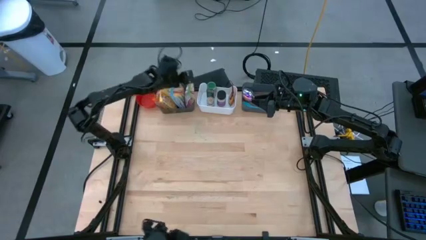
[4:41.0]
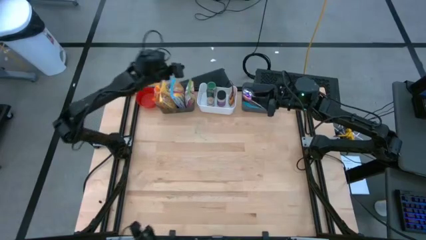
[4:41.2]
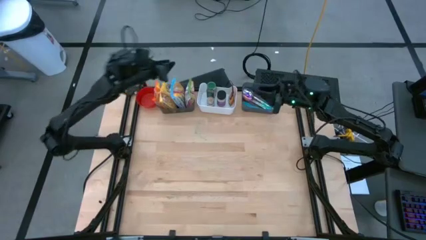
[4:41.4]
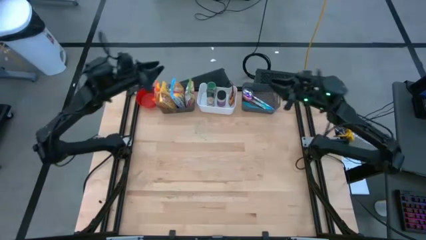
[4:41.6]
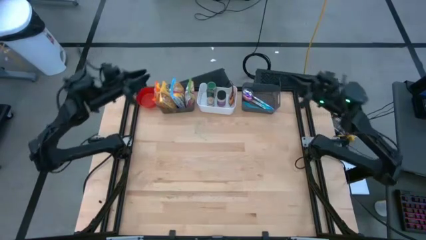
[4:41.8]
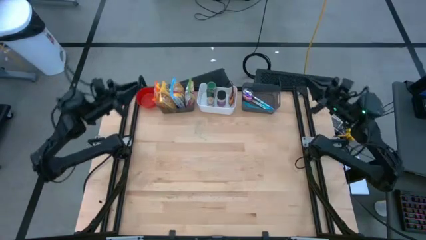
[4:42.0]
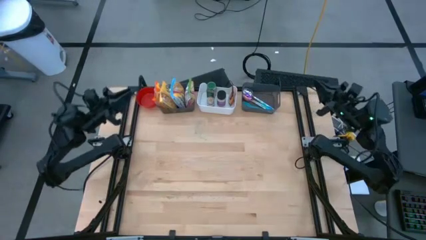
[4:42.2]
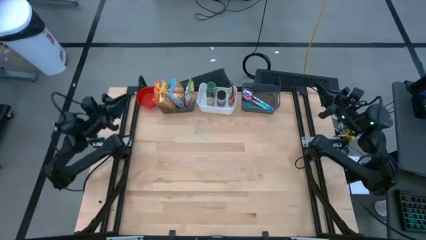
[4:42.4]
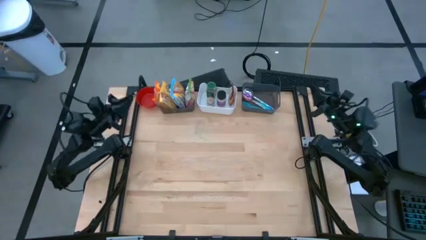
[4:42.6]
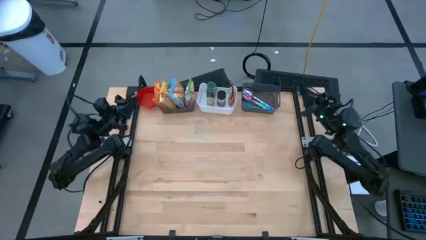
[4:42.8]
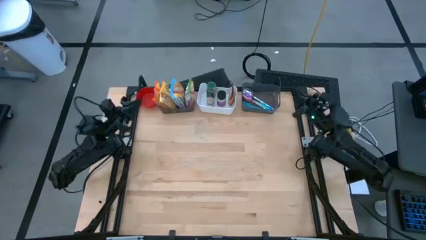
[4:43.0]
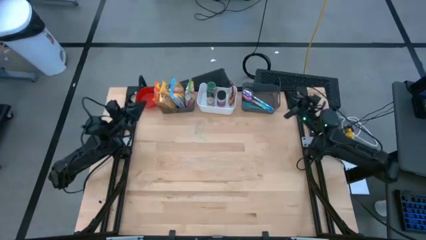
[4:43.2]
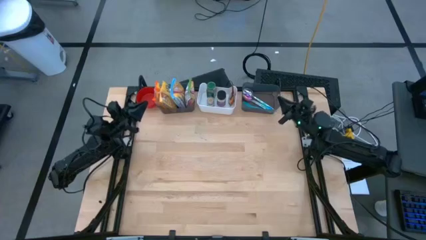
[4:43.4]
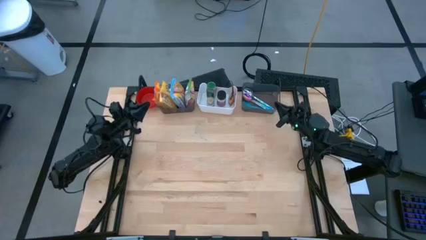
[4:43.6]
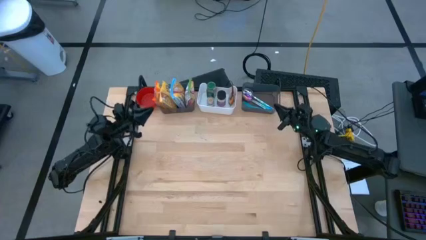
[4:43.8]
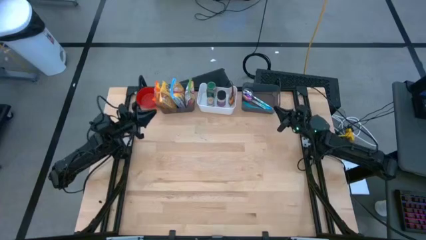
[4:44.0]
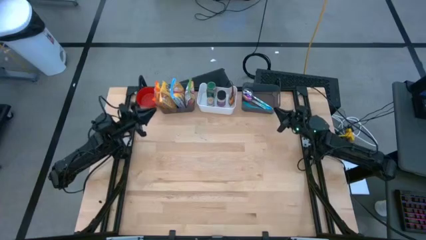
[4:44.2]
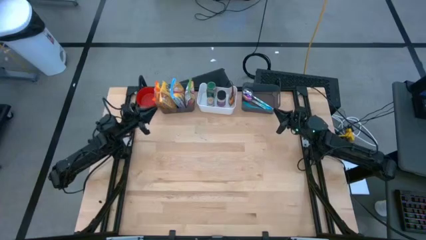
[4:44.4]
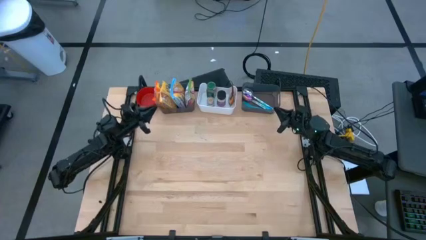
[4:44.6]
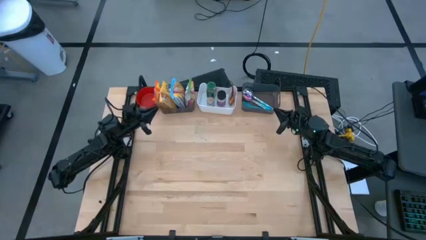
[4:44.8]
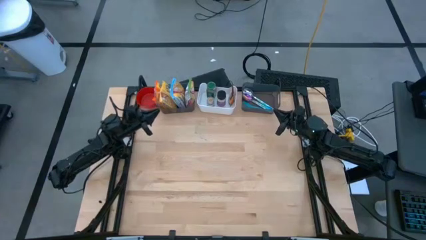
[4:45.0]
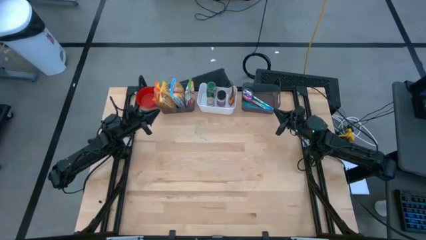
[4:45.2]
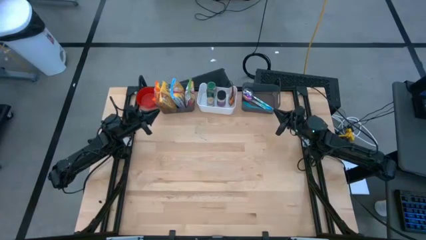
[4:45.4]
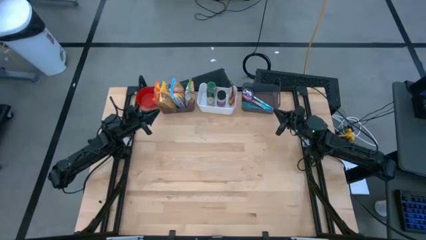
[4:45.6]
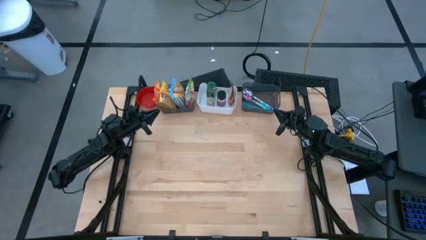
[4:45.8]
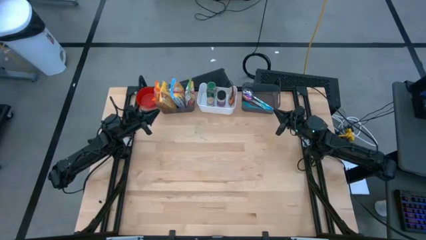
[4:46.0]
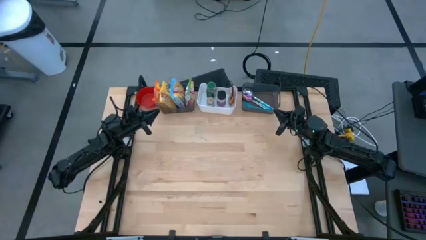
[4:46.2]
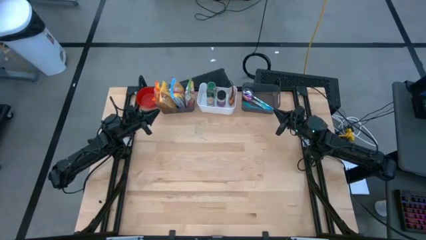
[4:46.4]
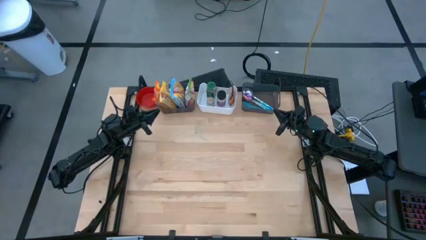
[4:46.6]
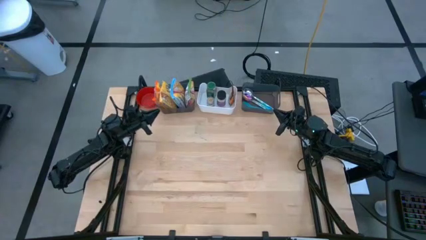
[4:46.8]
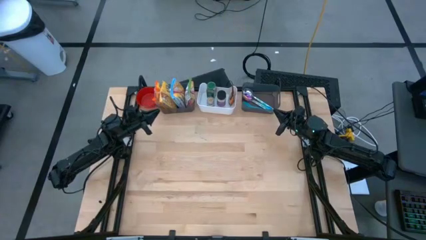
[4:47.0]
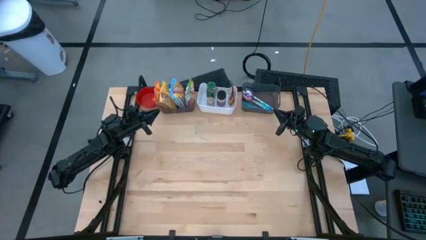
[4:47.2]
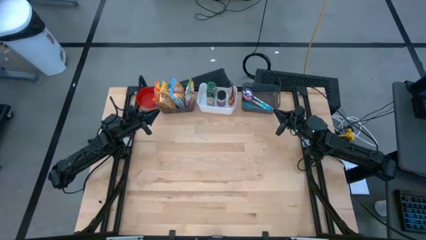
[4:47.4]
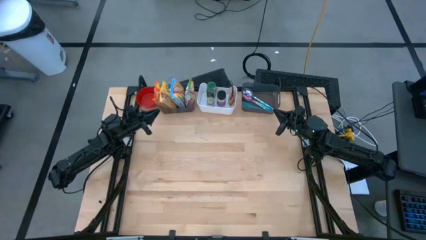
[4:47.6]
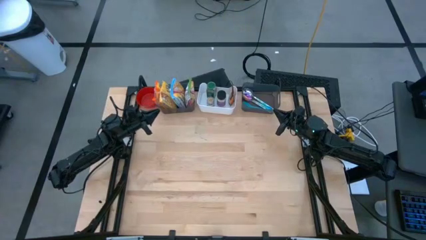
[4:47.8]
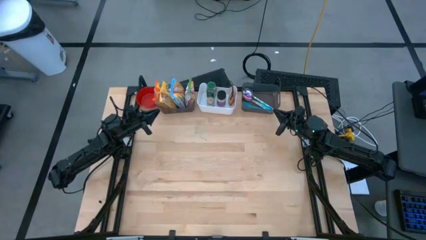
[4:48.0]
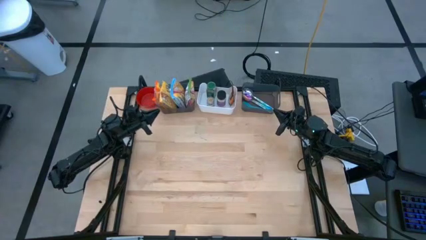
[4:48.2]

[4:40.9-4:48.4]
Task: Pick & Place Food Item
Return to Home Position
